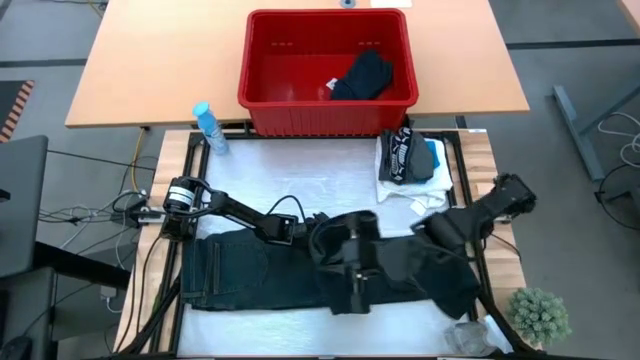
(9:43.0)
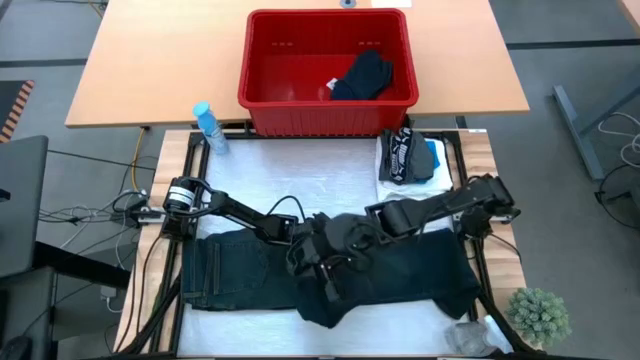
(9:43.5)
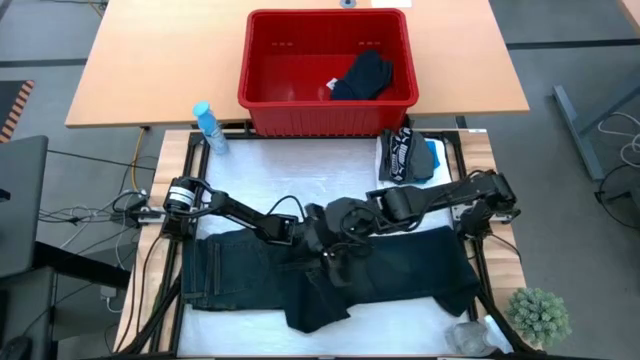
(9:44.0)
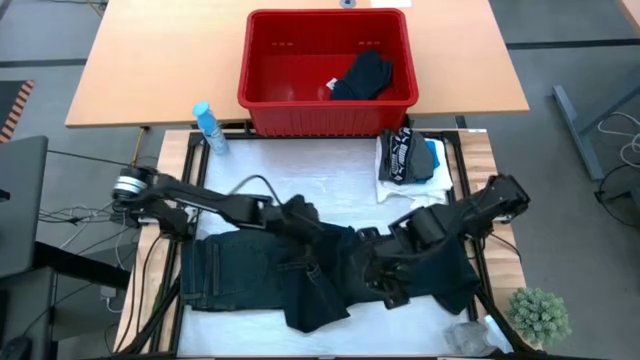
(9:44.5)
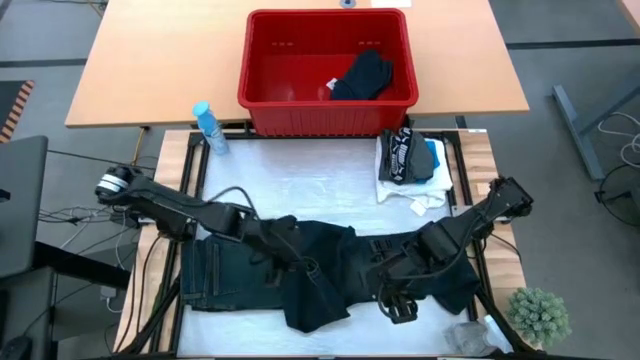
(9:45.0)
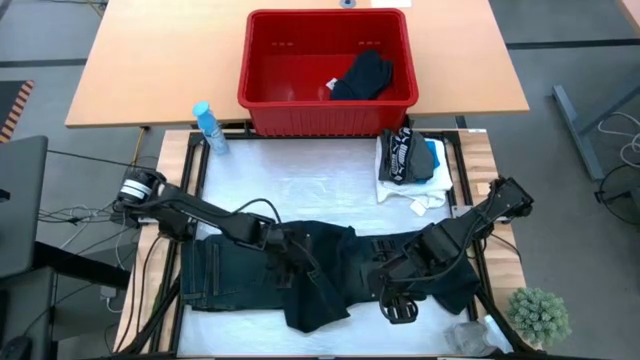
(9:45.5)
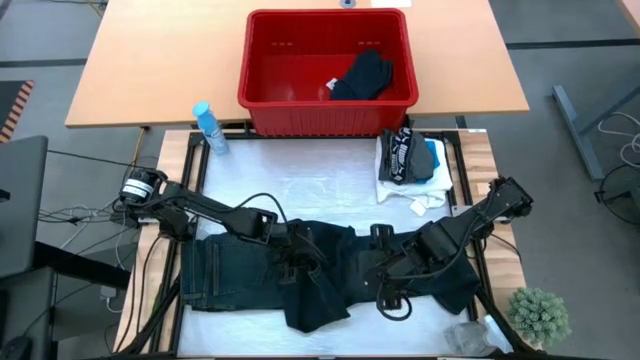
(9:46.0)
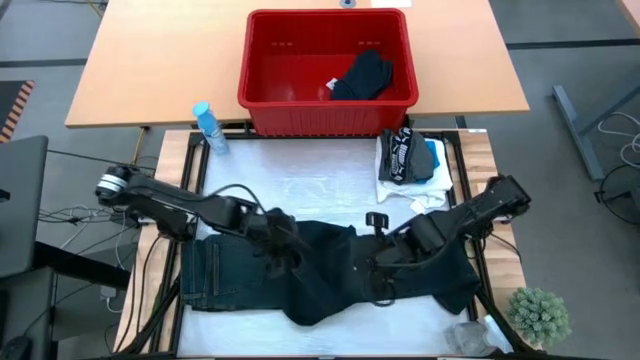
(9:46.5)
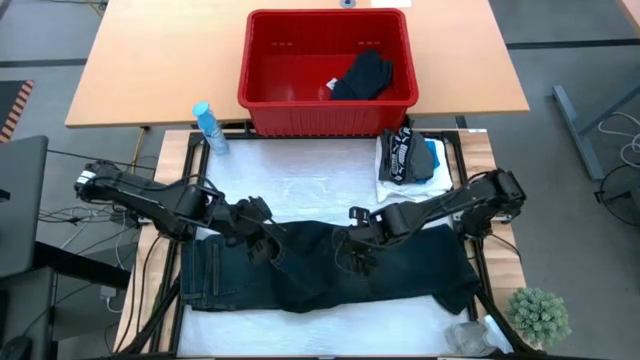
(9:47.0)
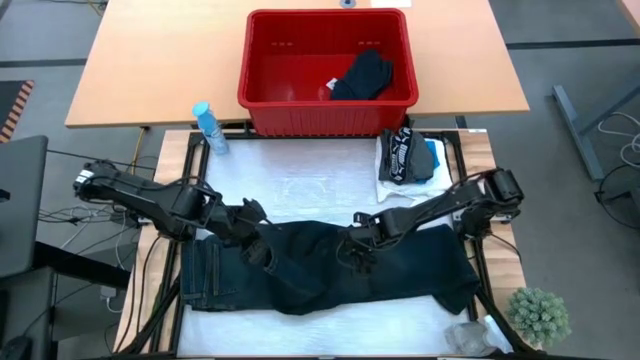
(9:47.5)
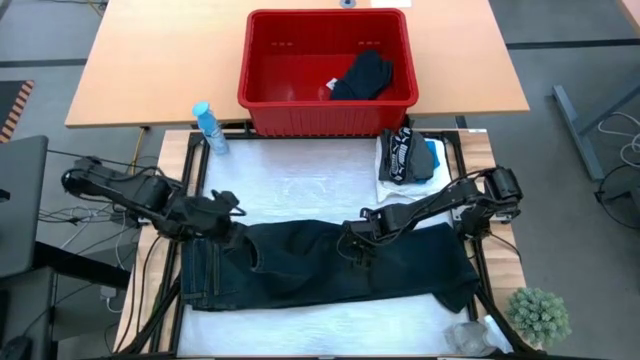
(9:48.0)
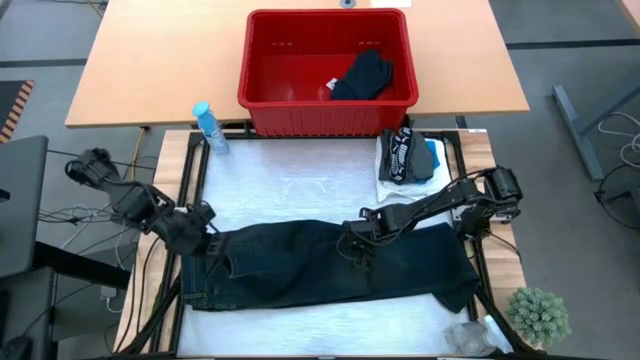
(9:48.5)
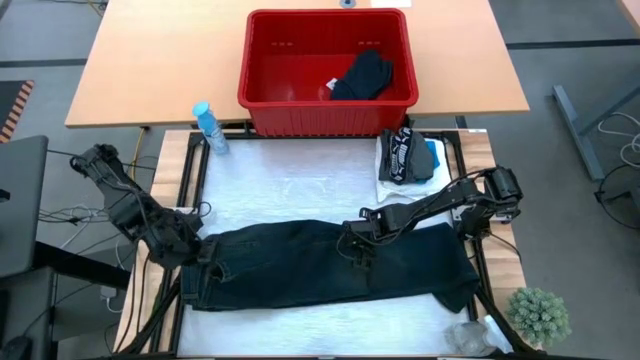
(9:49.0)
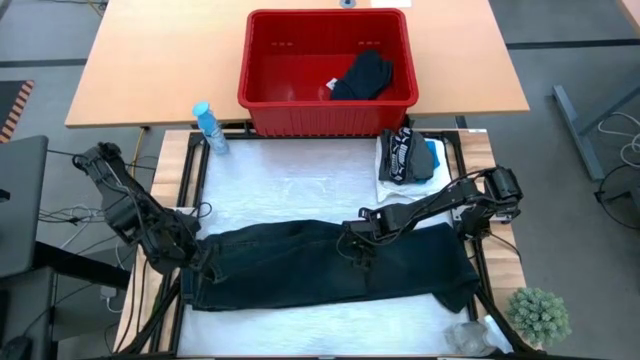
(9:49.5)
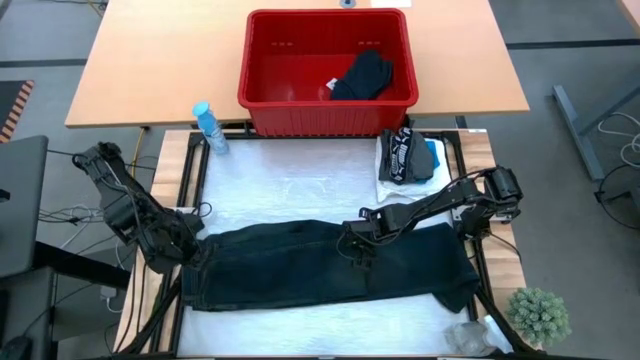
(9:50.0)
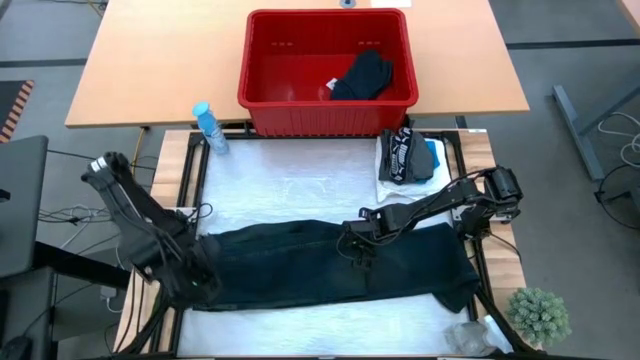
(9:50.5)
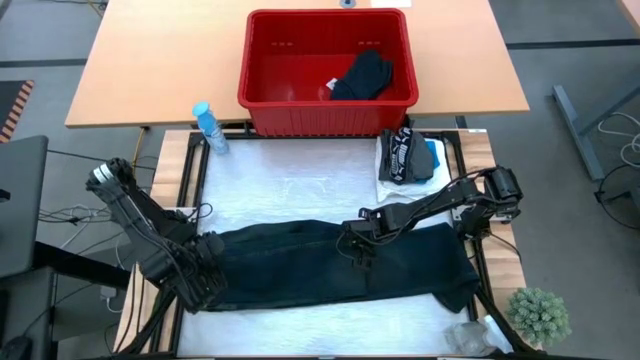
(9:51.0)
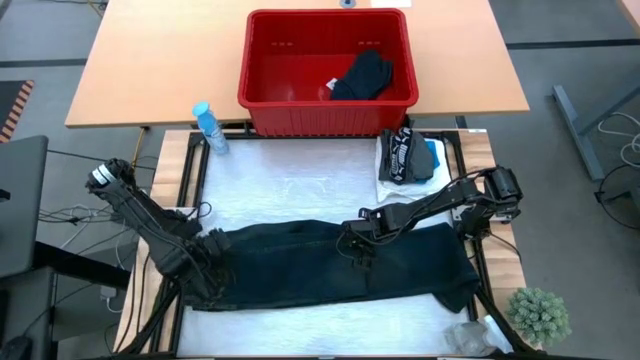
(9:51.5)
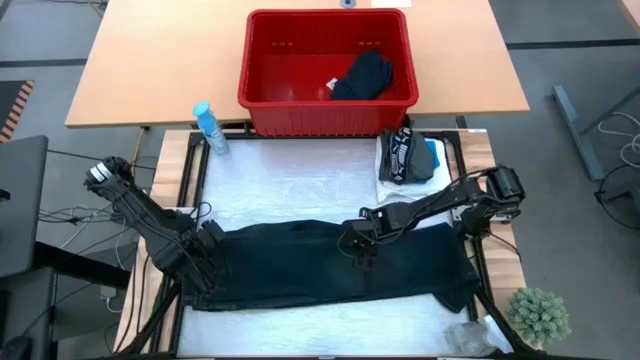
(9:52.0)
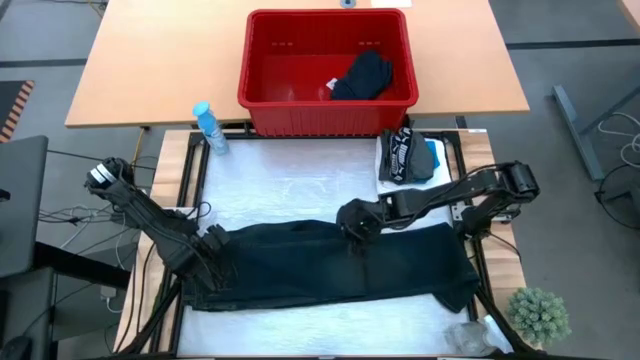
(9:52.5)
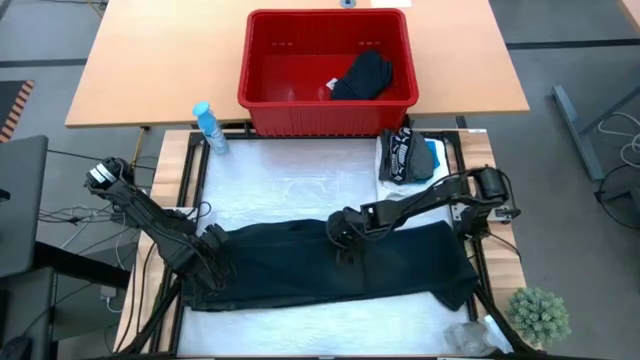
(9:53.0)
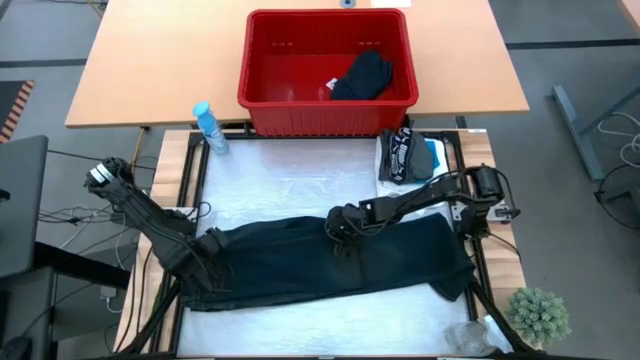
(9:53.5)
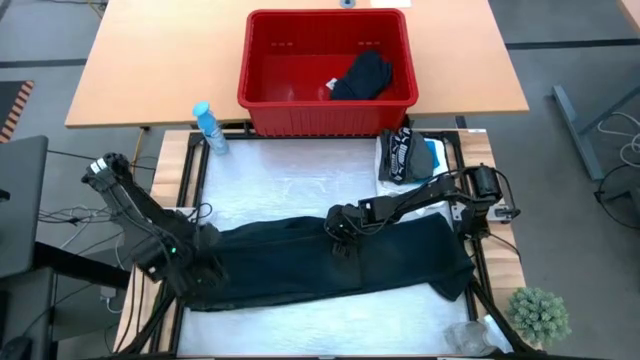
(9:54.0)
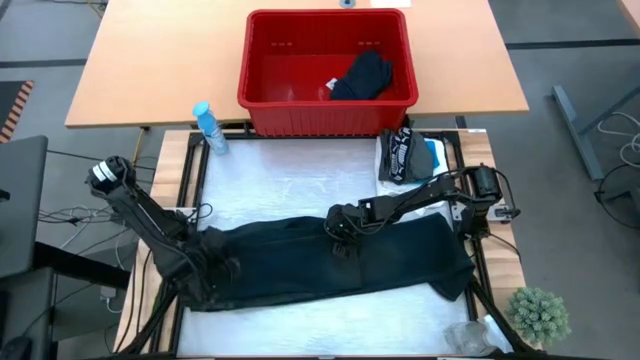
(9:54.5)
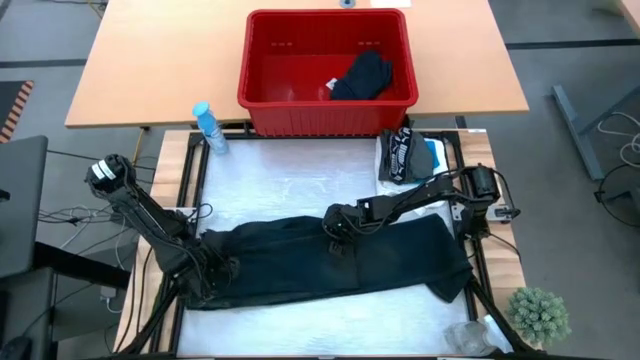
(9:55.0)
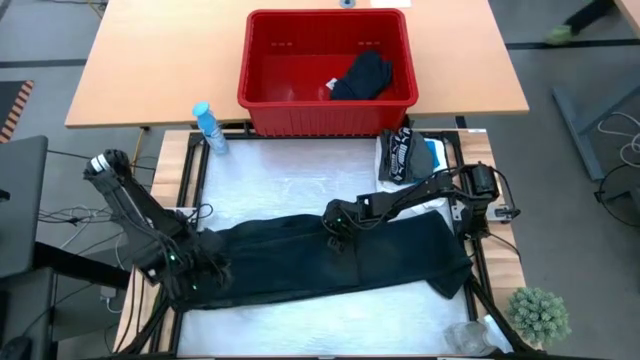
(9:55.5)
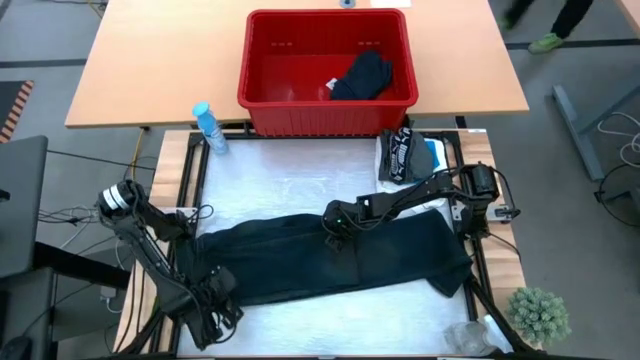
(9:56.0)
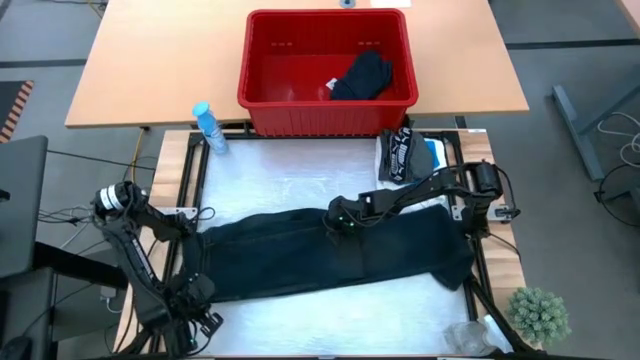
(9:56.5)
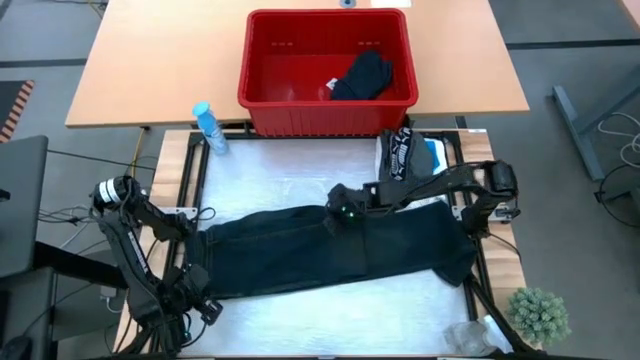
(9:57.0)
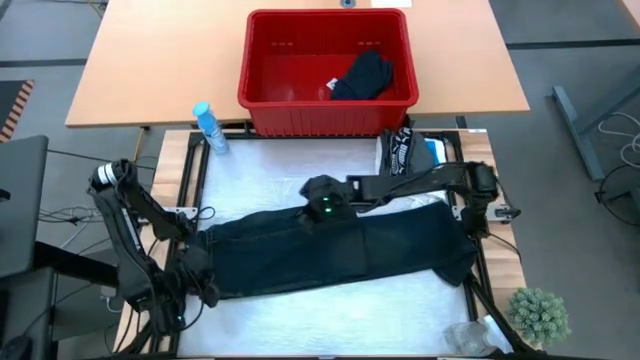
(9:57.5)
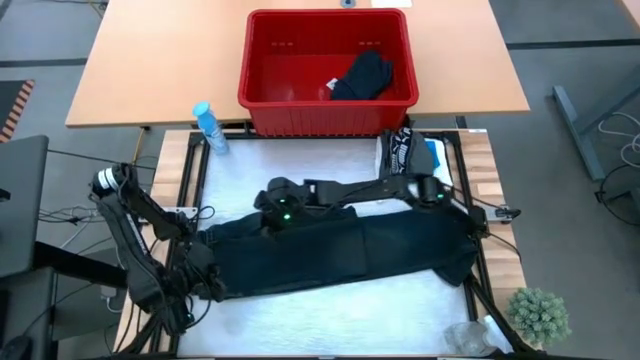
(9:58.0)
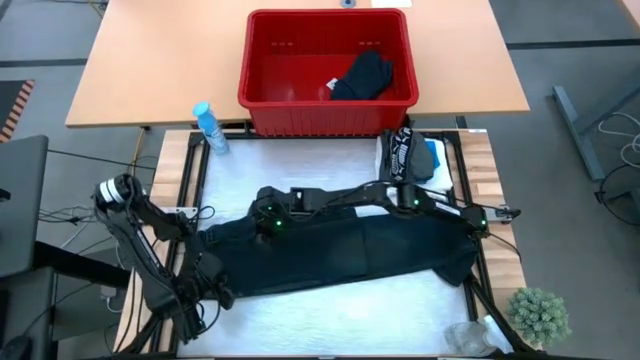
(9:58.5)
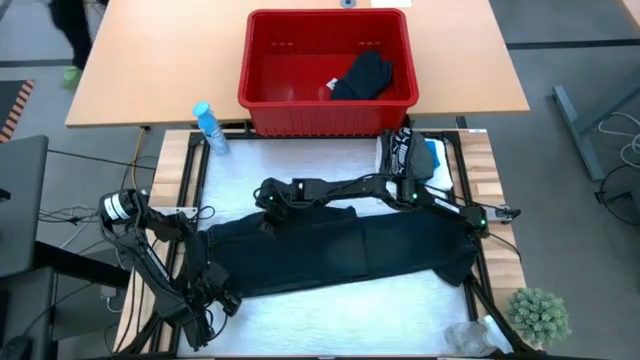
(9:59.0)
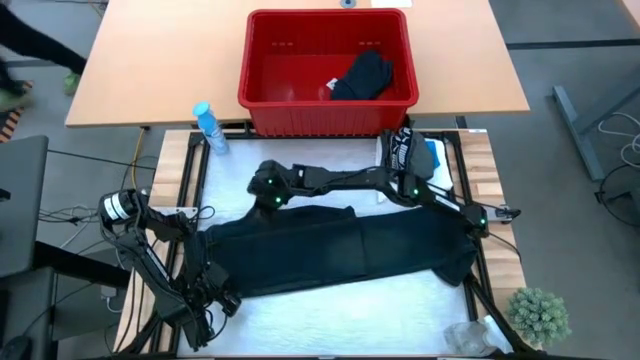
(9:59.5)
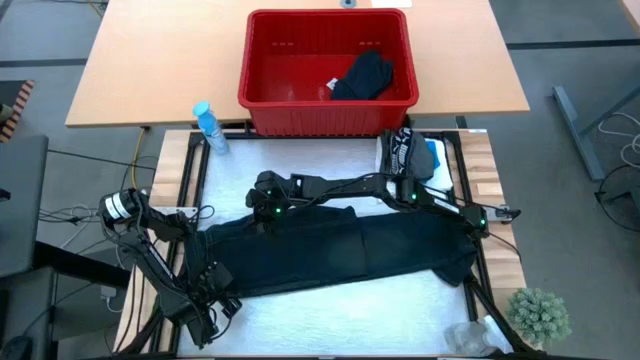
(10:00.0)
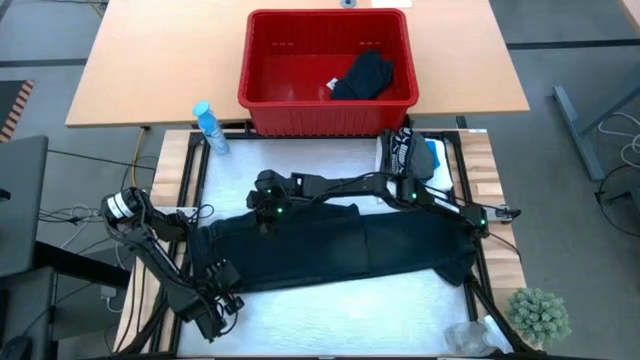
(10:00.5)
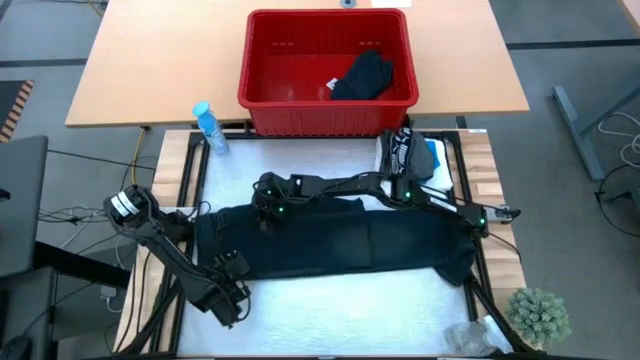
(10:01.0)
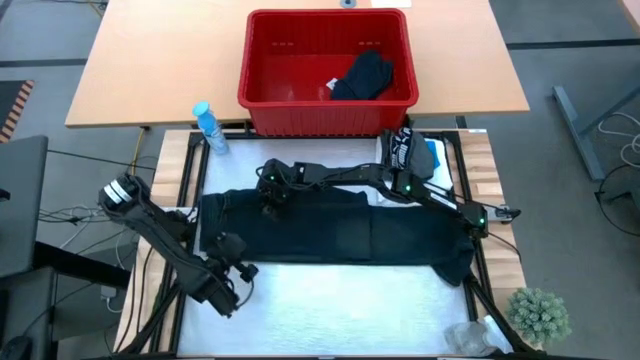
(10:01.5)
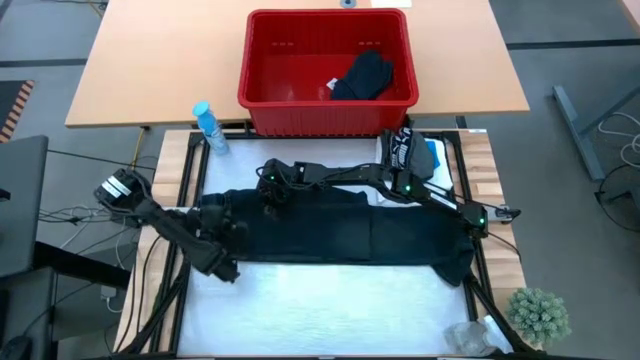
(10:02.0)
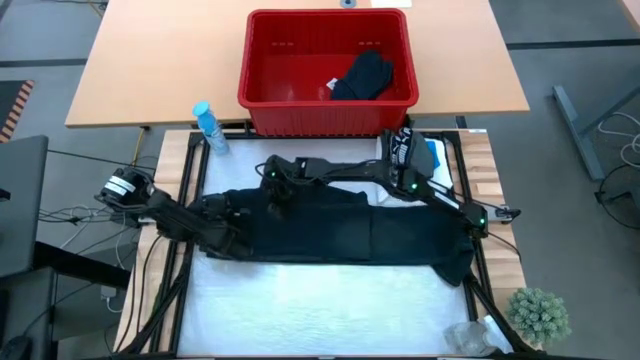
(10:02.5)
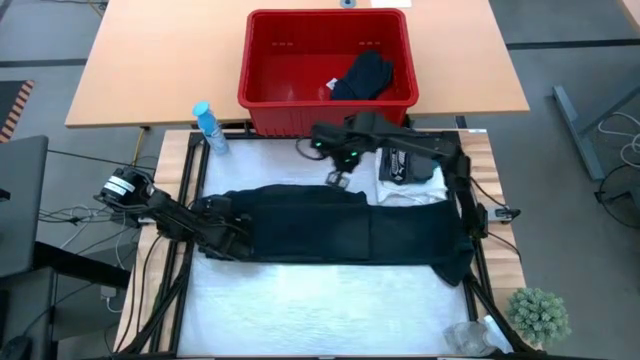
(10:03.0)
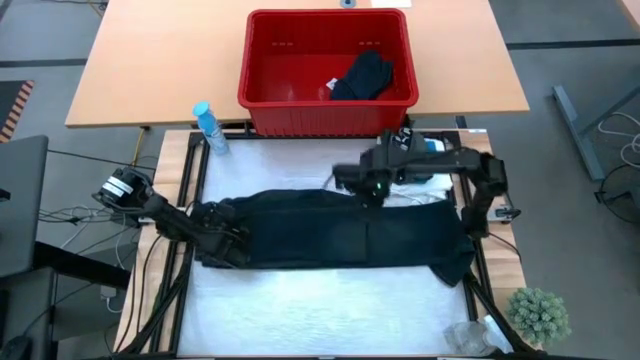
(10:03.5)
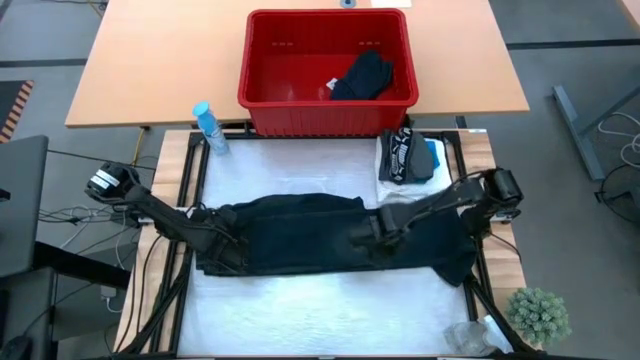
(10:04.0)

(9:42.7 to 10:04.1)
Task: Fold laundry
Fold the blue pants

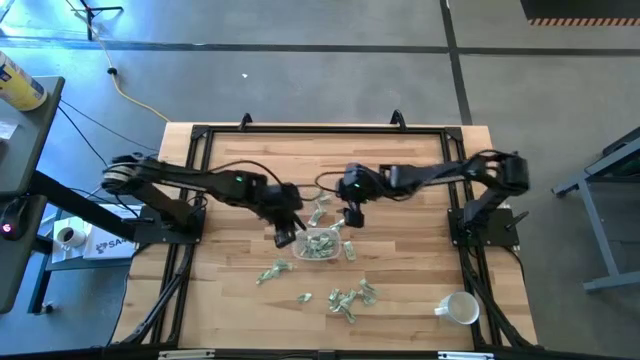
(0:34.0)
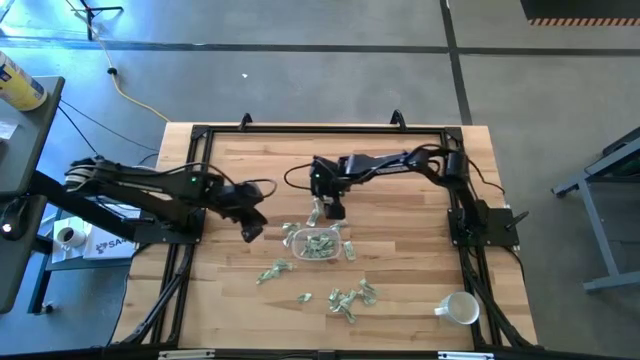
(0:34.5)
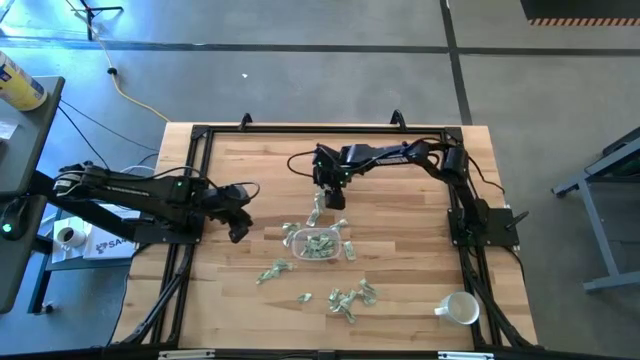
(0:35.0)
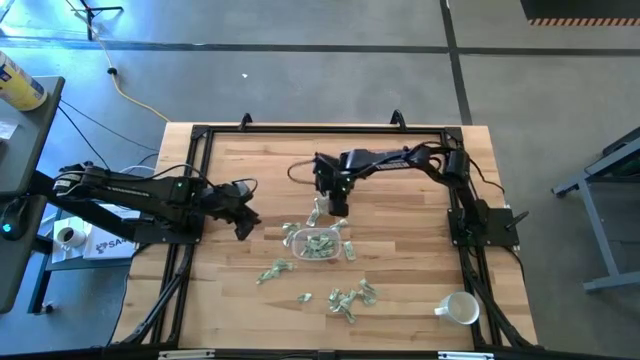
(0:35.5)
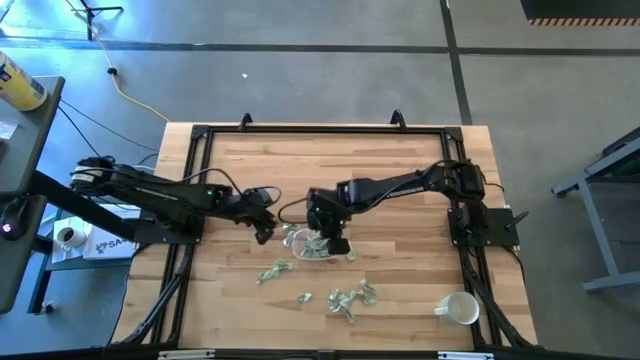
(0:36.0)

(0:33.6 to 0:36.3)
Task: Pick and place Stevia / Truvia into bins
Put the green stevia packet into the transparent bin
